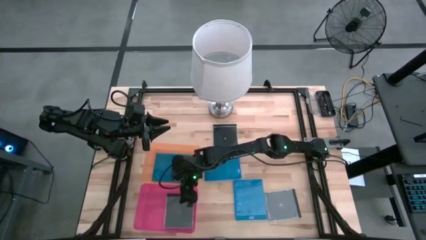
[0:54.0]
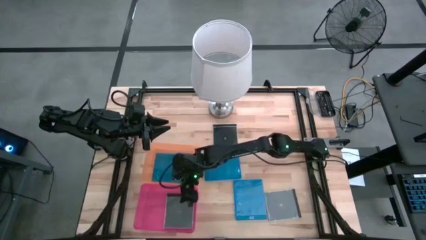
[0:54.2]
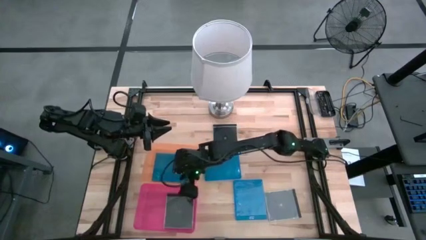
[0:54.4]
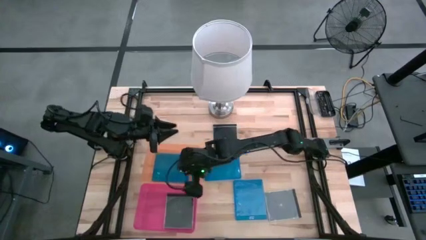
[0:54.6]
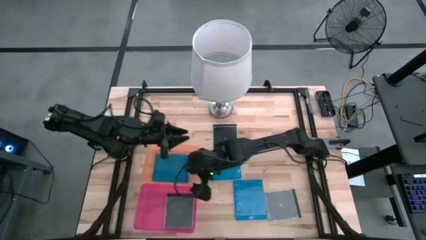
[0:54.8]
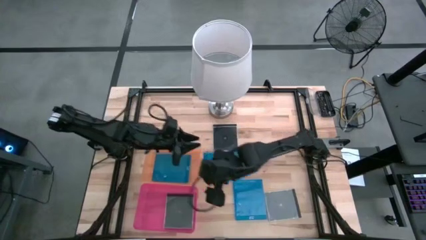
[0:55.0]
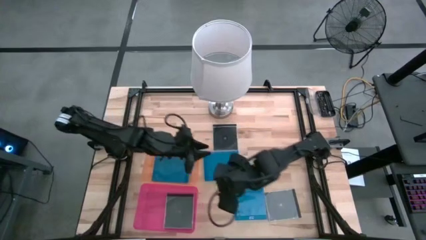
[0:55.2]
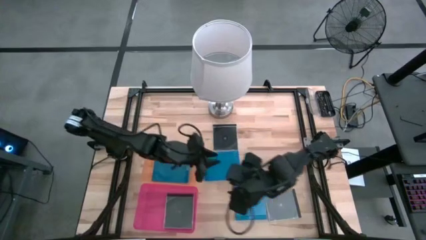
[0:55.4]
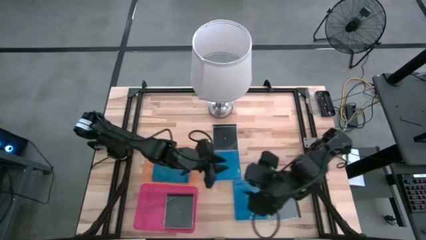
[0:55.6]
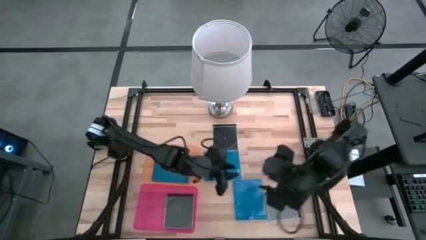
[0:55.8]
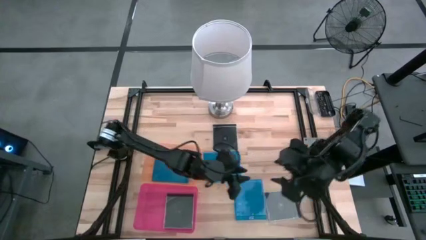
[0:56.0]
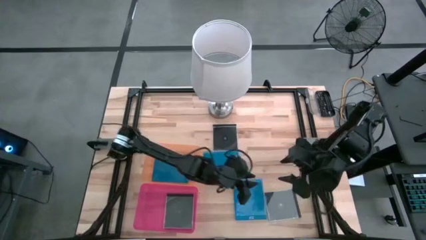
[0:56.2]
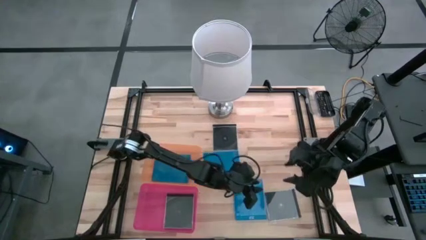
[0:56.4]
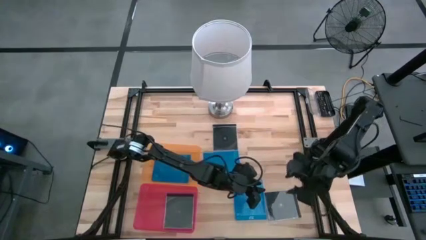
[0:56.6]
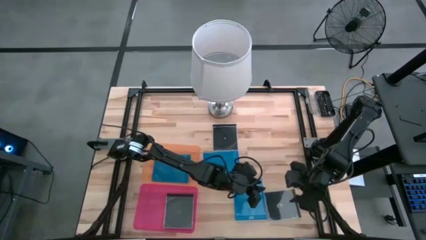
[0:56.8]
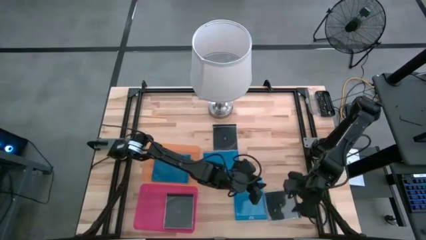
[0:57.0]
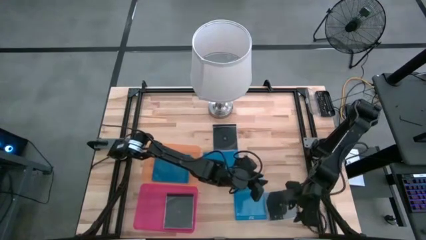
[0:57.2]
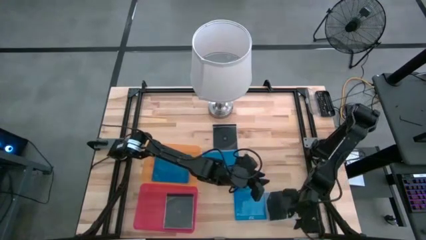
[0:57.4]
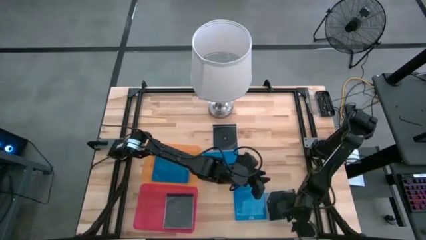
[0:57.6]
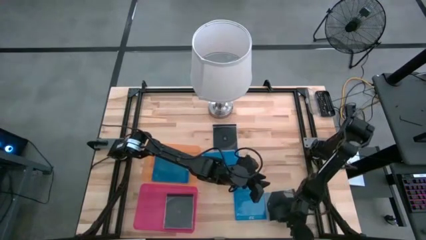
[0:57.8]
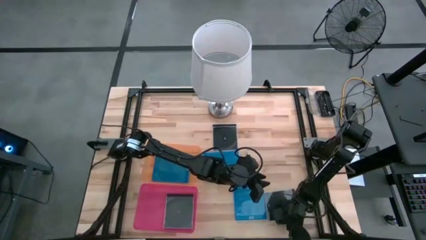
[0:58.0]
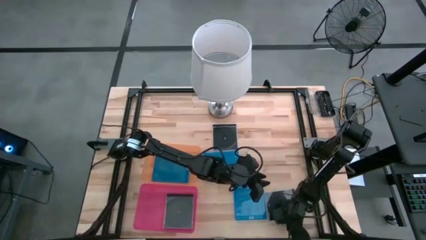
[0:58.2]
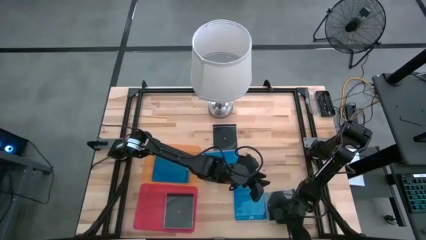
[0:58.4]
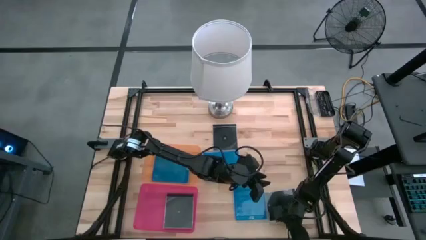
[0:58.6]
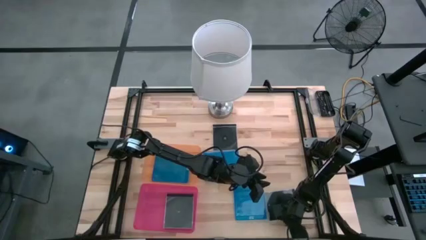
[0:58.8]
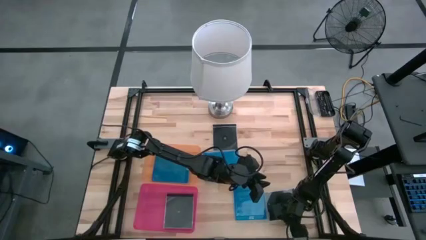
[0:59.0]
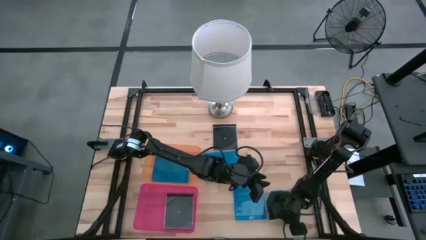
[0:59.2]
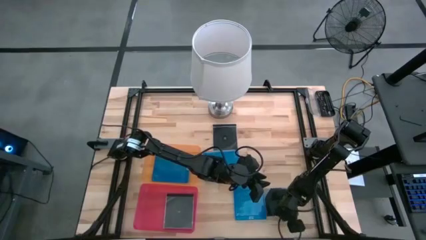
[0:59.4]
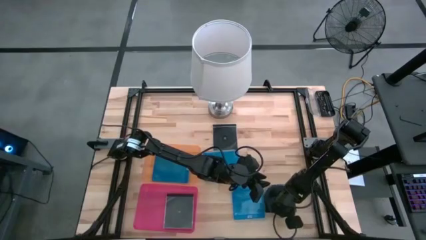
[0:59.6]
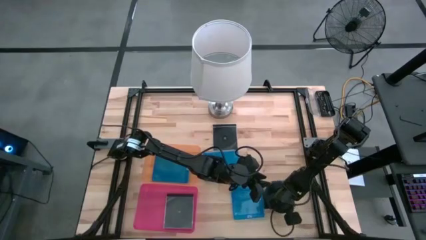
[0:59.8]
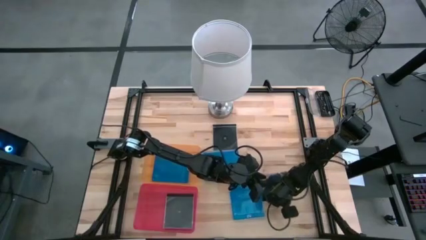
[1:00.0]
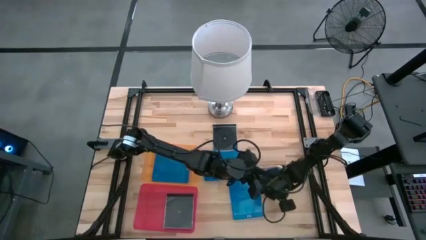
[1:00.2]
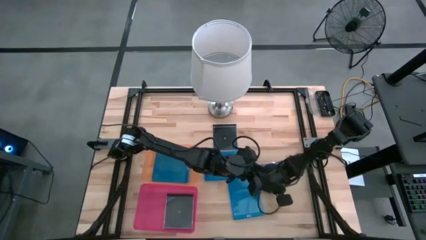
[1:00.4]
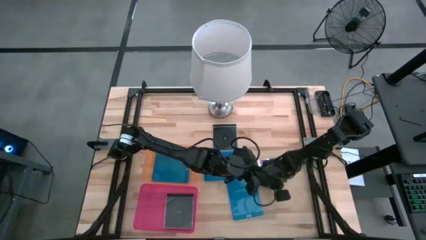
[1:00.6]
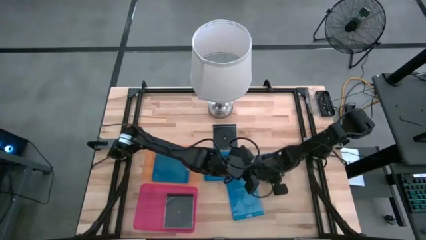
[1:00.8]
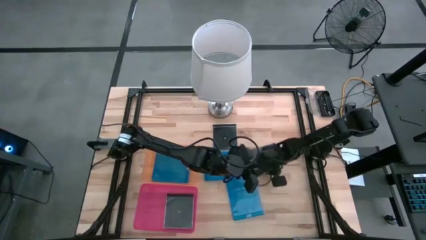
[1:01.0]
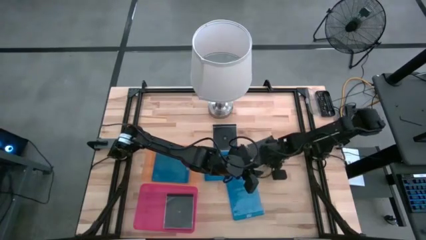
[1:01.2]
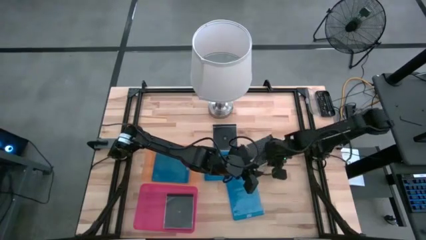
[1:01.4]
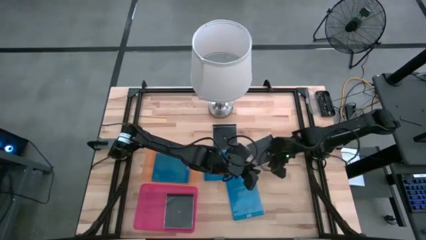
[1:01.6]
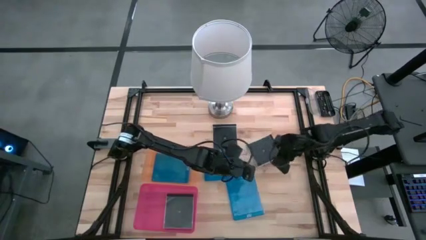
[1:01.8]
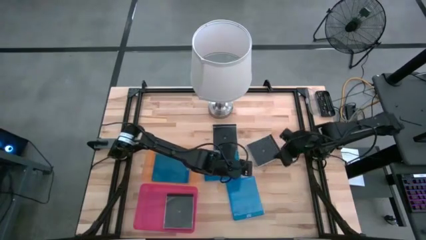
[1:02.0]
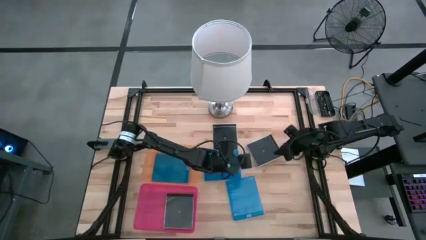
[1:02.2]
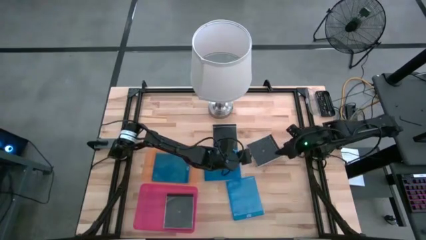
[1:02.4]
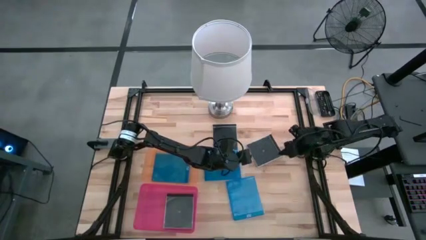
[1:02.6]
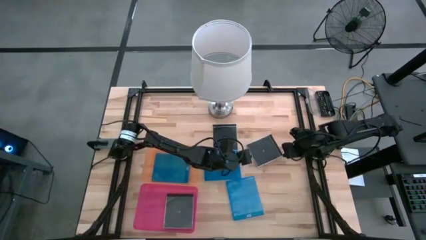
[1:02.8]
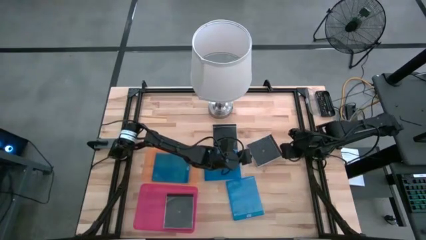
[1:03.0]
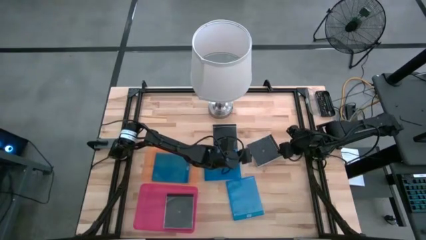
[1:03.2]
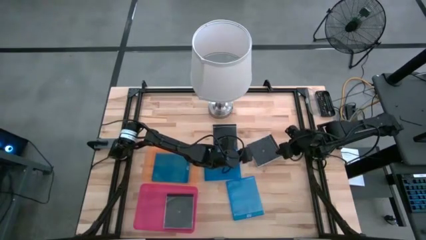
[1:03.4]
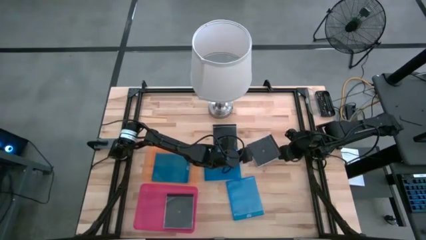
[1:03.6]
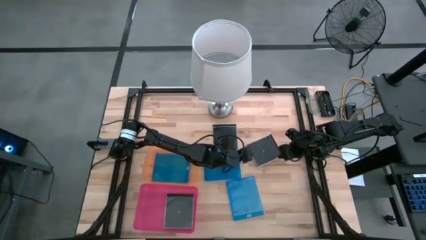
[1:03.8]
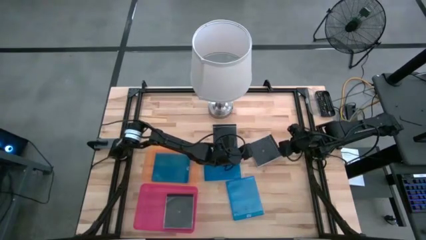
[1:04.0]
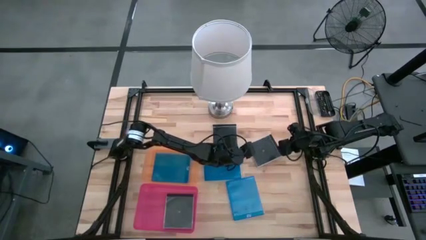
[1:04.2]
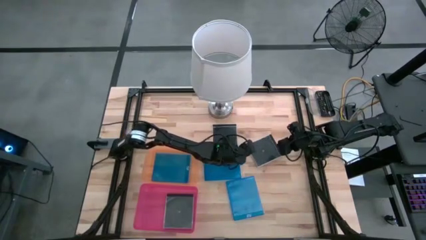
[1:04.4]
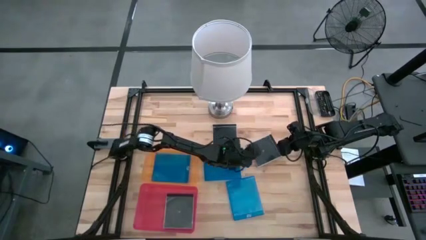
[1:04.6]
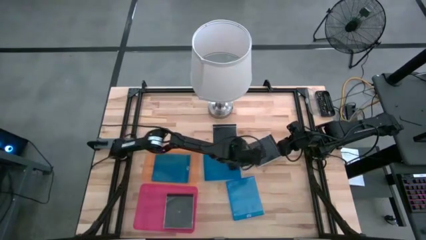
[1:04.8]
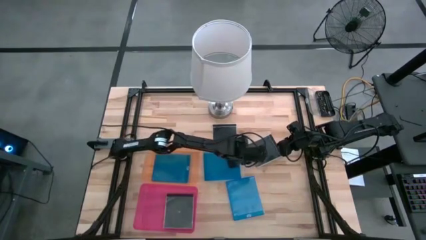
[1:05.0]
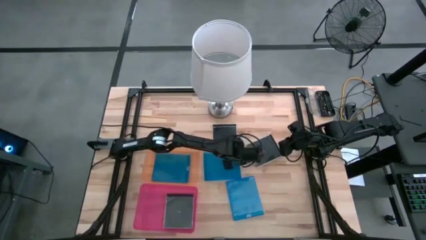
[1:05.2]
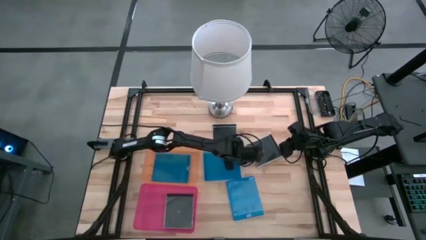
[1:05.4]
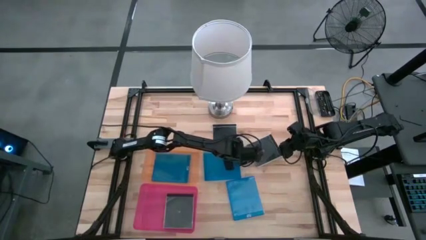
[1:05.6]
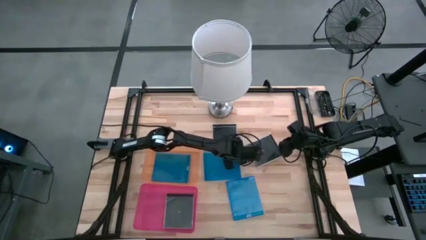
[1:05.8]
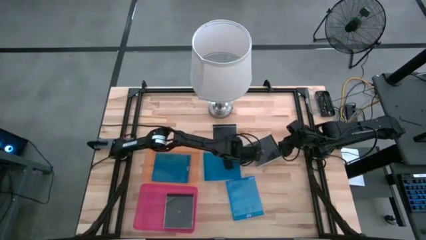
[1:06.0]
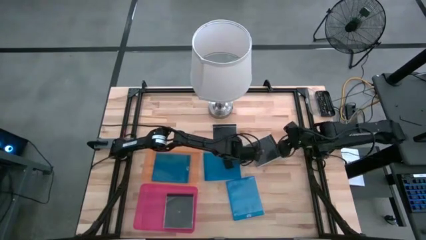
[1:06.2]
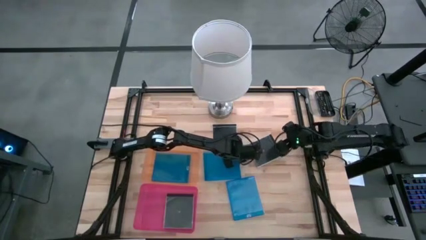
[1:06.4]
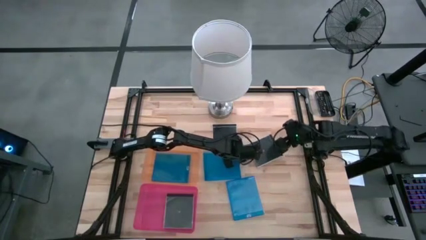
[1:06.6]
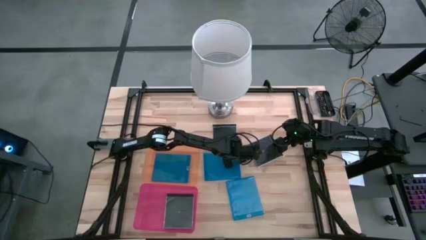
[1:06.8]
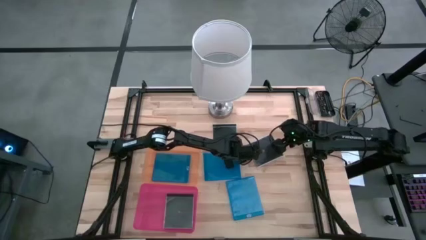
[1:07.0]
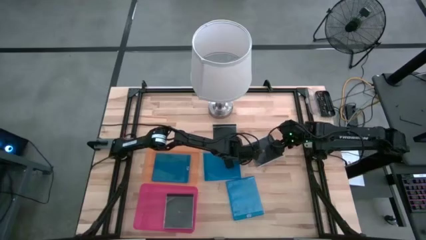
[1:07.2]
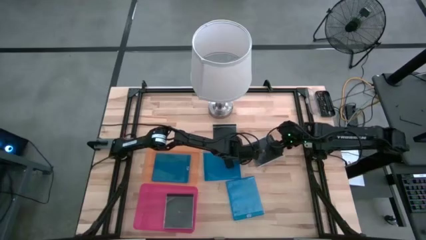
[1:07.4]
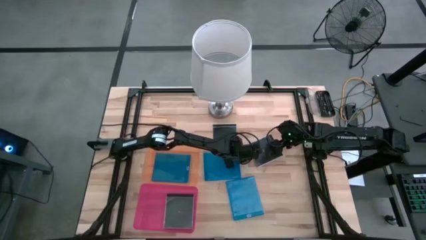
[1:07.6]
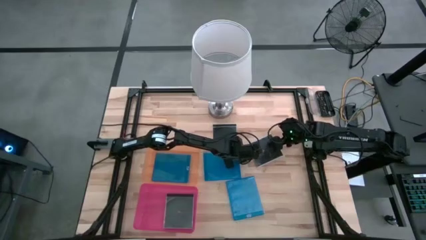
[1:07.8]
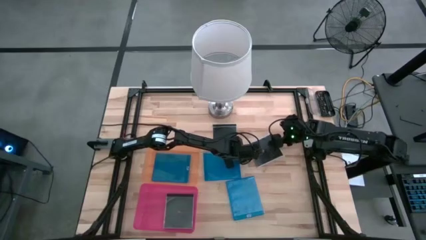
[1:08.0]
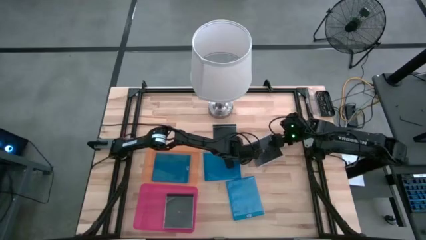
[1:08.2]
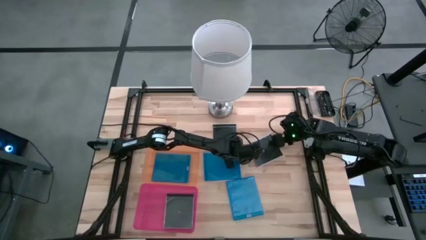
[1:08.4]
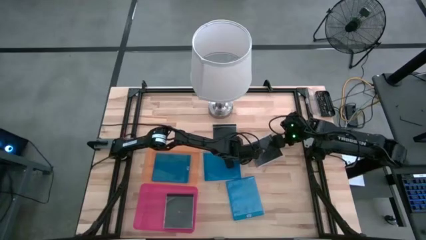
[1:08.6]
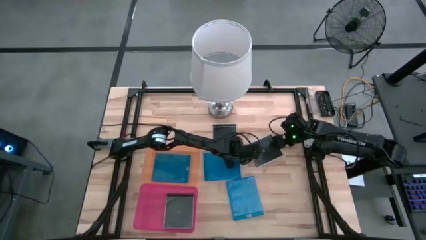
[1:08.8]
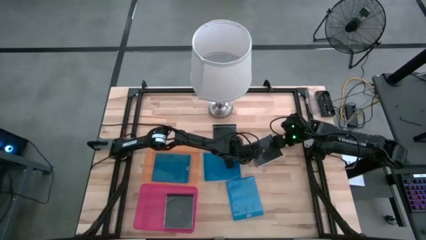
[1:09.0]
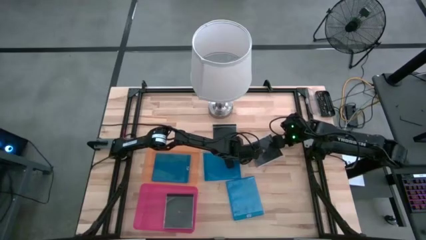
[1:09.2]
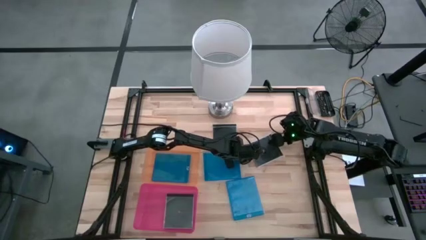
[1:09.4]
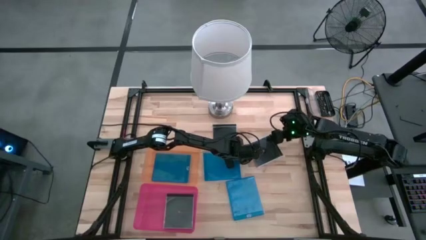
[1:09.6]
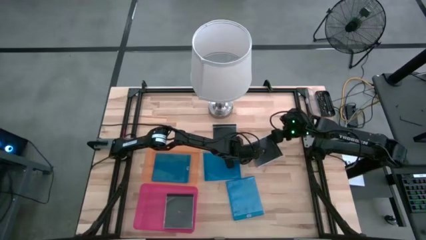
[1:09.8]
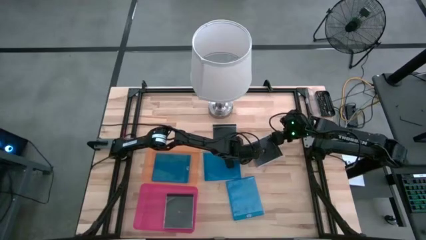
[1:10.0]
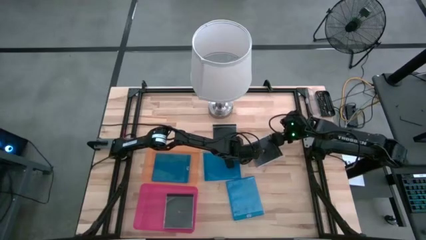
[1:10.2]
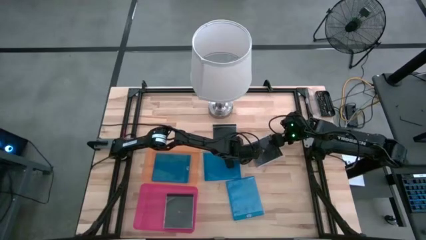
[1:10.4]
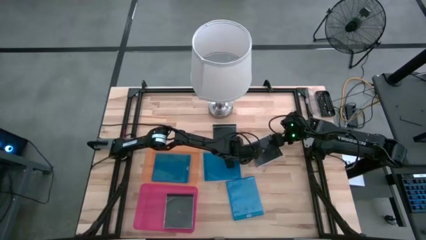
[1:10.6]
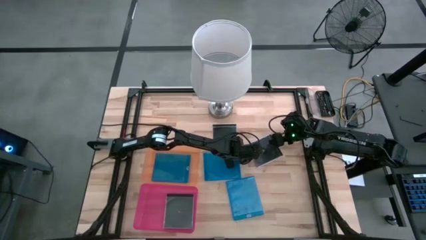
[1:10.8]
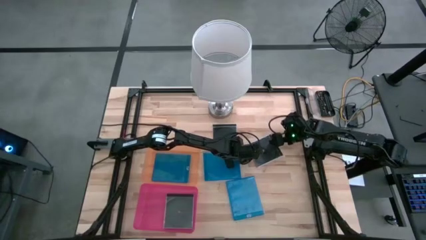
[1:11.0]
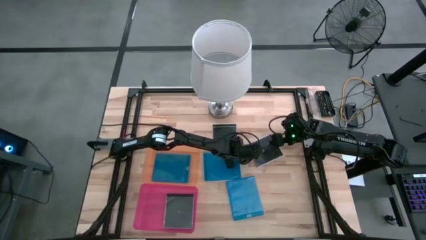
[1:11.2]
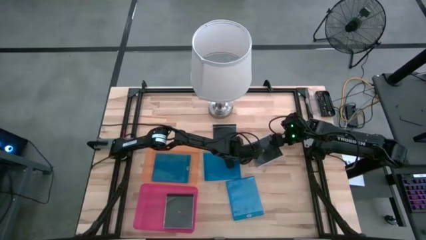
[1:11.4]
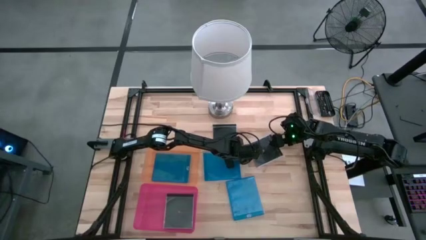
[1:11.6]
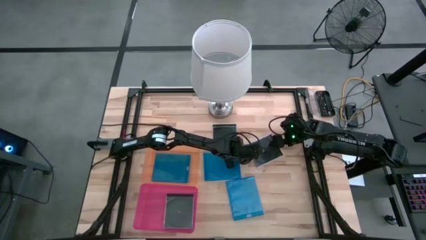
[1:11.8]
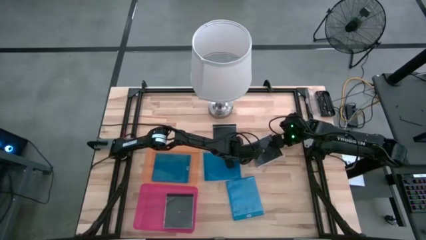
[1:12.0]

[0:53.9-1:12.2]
Task: Pick & place jewel cases by type
Put the bottom black CD case into the pink bin
